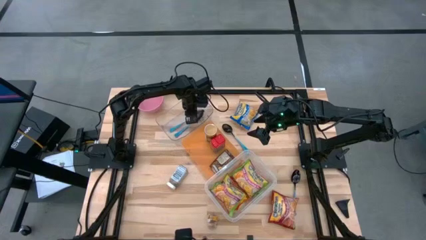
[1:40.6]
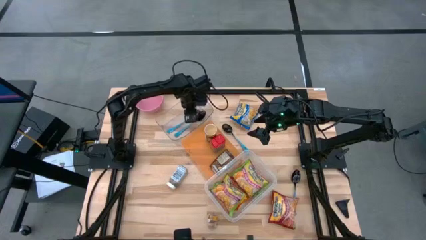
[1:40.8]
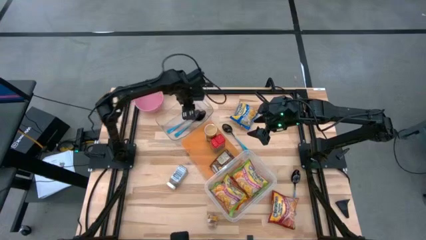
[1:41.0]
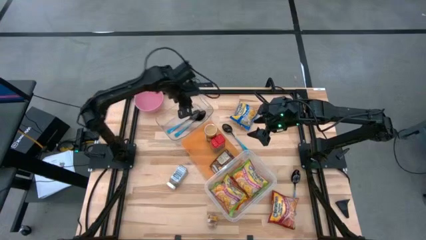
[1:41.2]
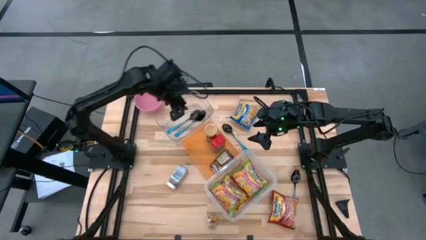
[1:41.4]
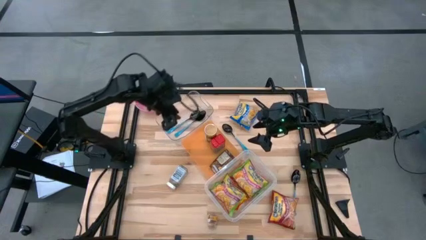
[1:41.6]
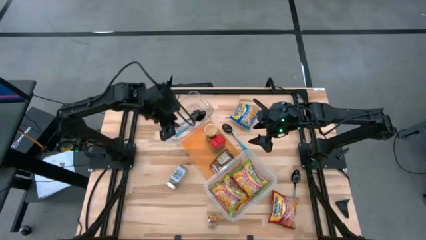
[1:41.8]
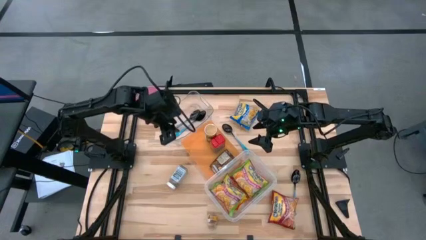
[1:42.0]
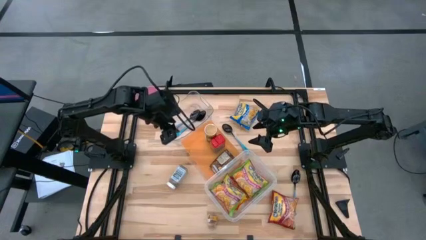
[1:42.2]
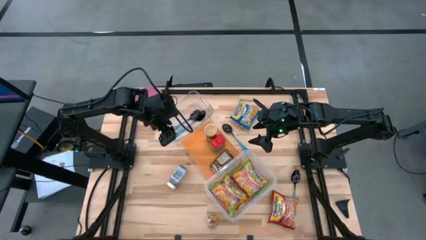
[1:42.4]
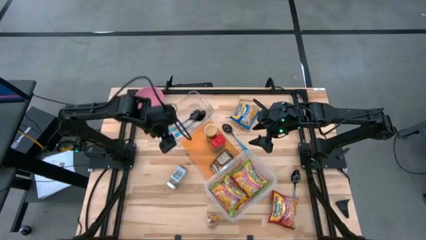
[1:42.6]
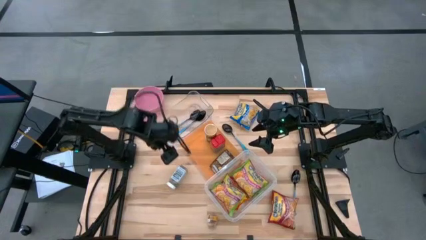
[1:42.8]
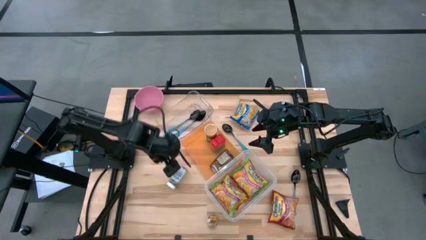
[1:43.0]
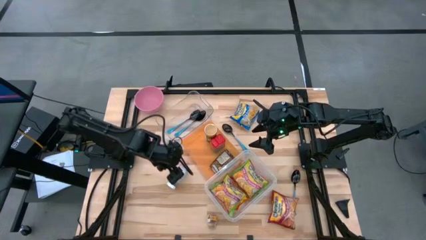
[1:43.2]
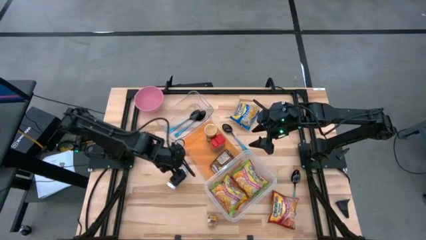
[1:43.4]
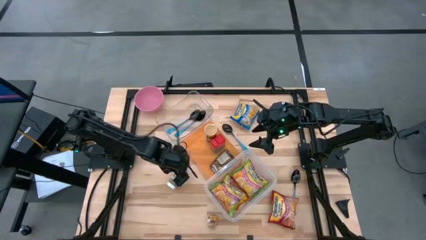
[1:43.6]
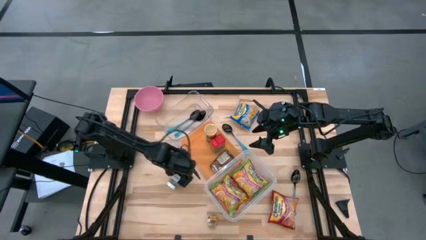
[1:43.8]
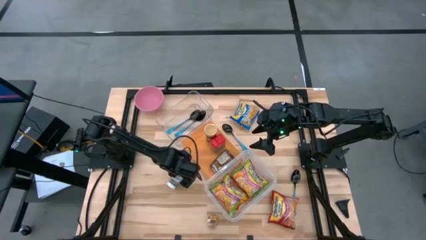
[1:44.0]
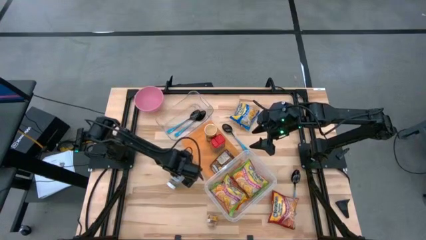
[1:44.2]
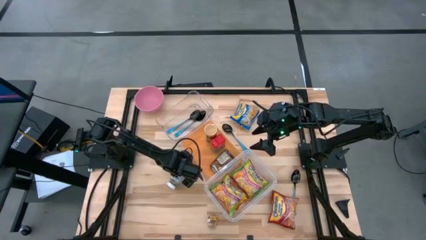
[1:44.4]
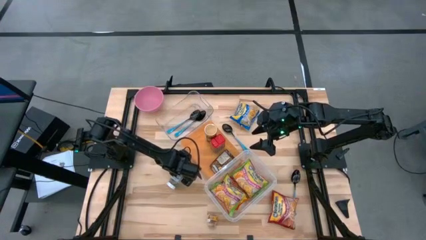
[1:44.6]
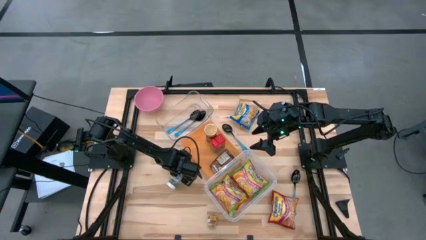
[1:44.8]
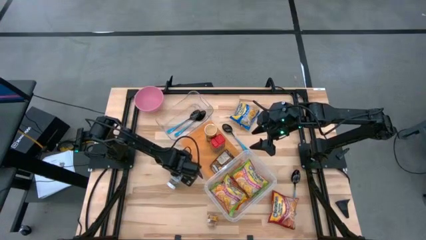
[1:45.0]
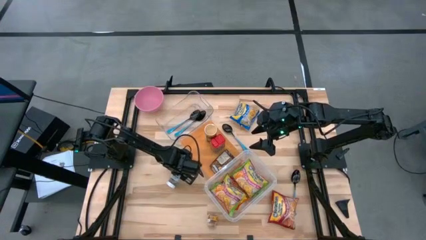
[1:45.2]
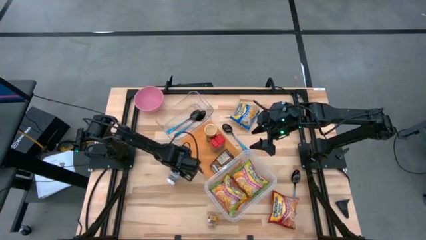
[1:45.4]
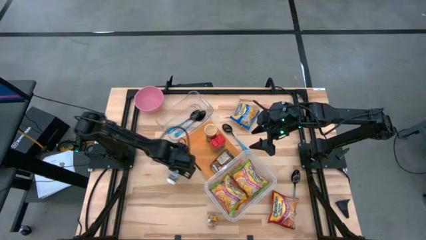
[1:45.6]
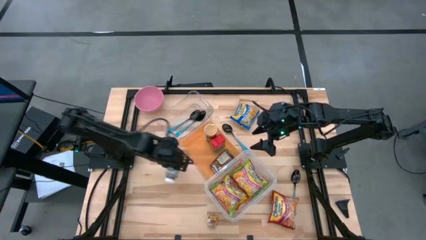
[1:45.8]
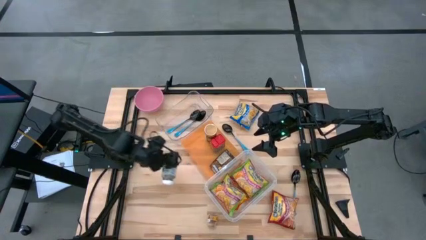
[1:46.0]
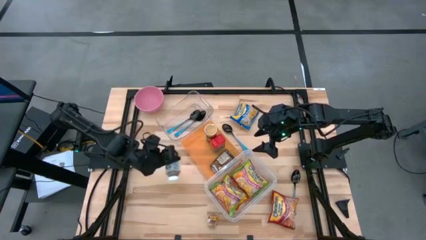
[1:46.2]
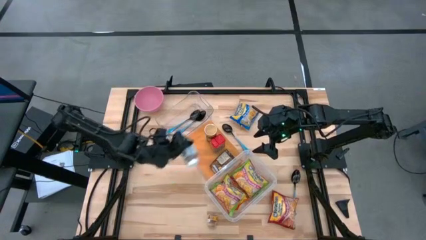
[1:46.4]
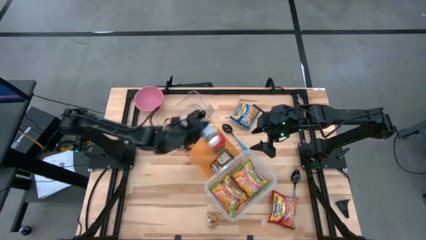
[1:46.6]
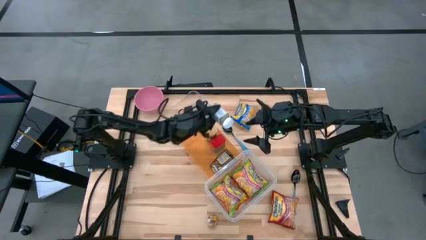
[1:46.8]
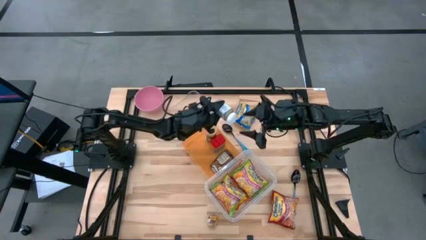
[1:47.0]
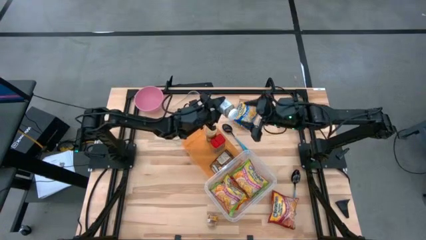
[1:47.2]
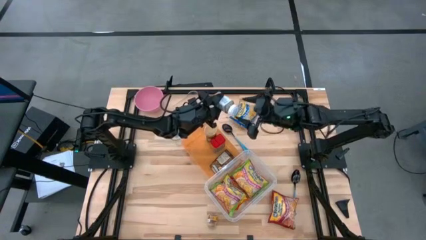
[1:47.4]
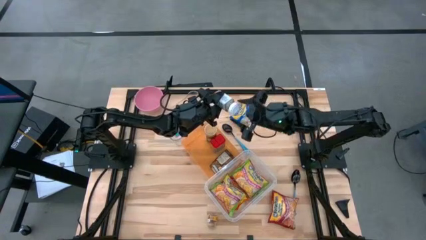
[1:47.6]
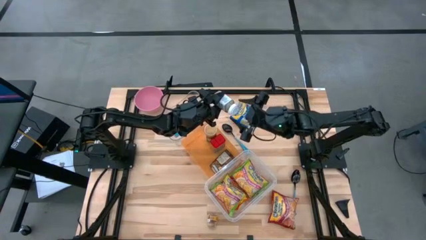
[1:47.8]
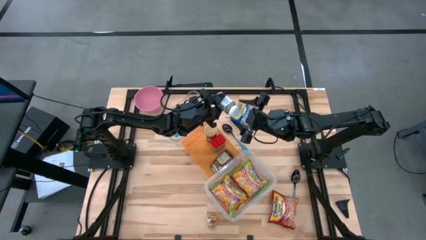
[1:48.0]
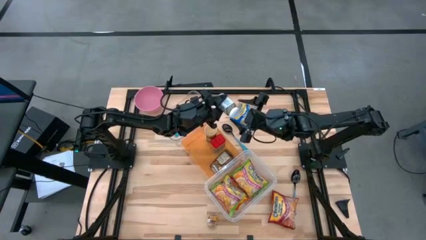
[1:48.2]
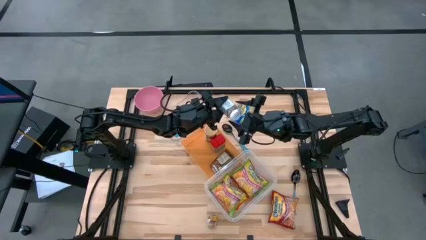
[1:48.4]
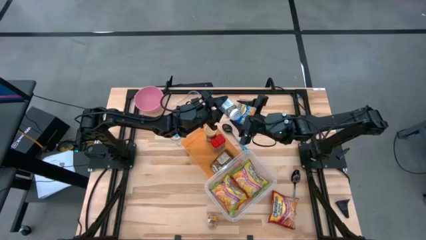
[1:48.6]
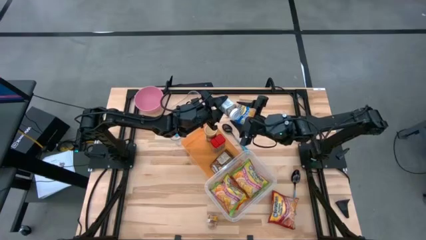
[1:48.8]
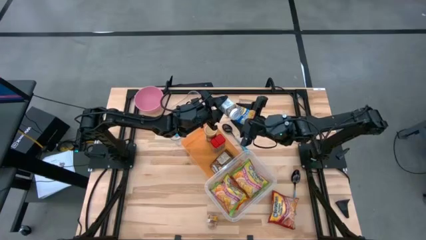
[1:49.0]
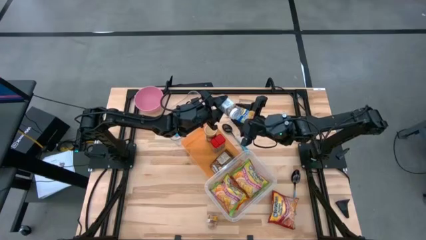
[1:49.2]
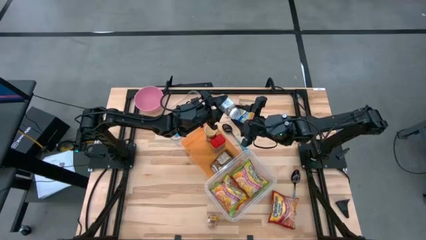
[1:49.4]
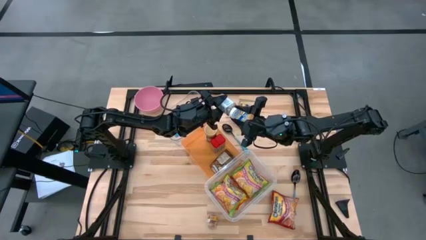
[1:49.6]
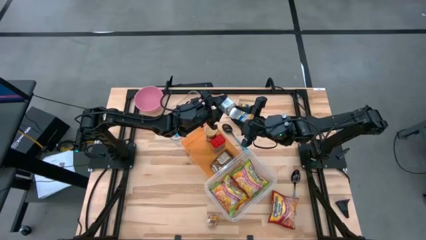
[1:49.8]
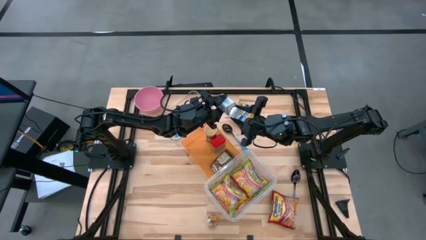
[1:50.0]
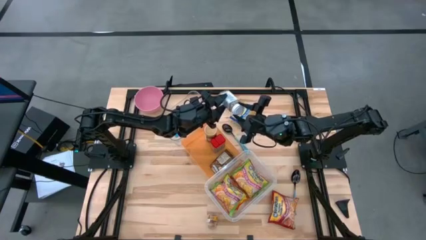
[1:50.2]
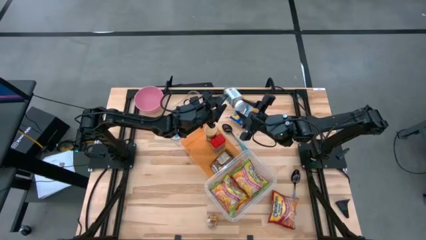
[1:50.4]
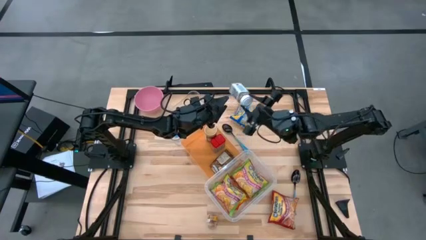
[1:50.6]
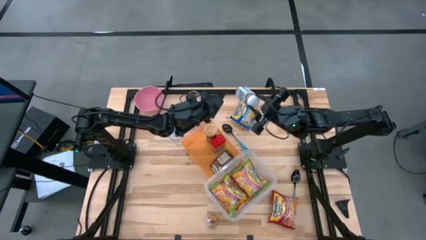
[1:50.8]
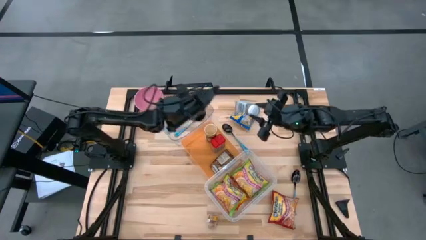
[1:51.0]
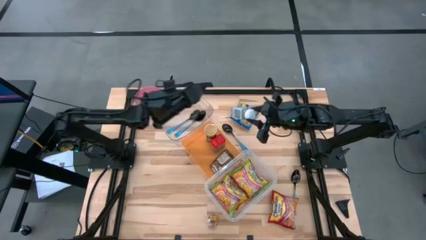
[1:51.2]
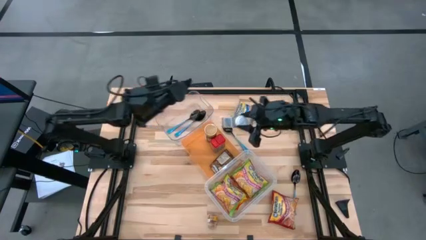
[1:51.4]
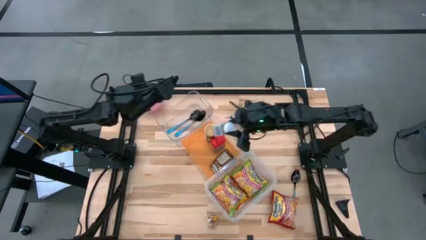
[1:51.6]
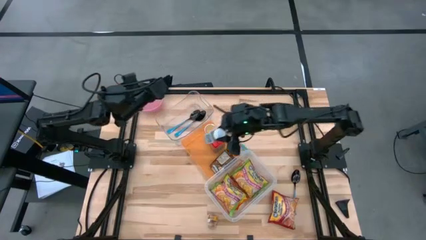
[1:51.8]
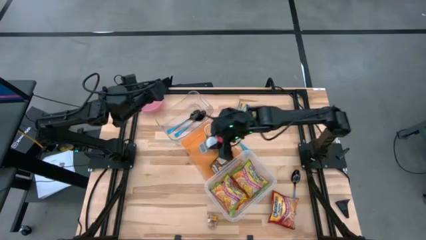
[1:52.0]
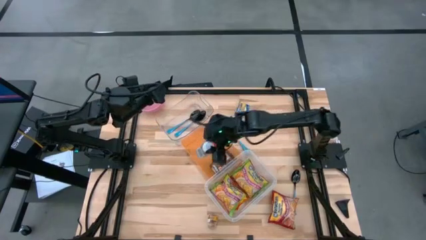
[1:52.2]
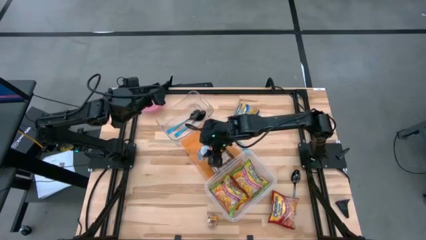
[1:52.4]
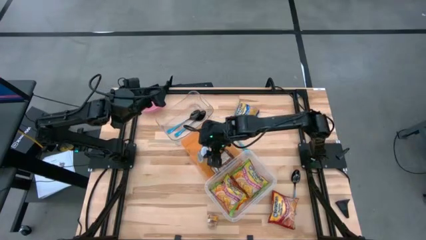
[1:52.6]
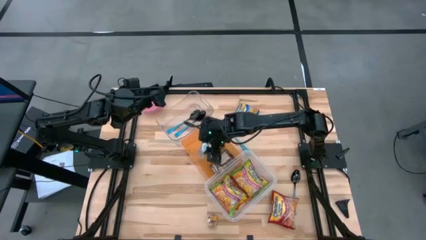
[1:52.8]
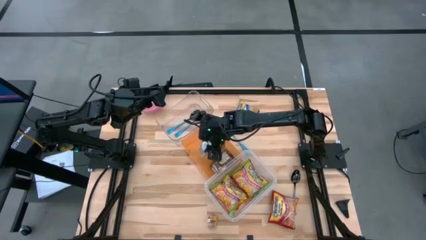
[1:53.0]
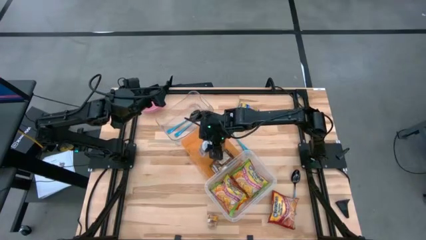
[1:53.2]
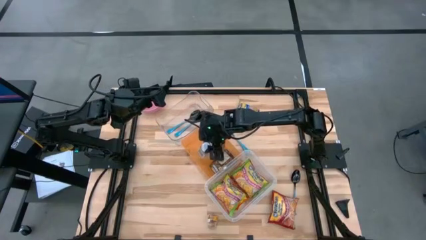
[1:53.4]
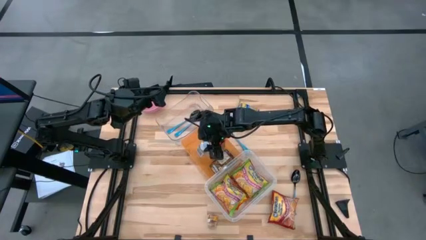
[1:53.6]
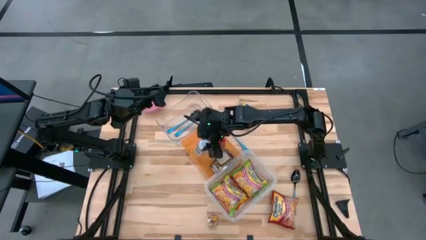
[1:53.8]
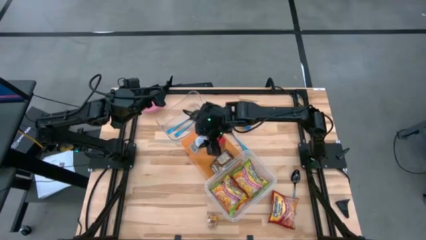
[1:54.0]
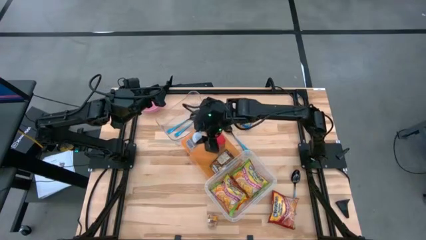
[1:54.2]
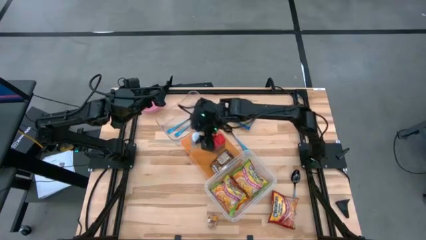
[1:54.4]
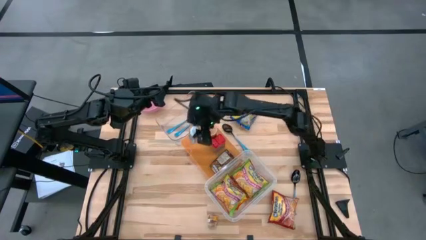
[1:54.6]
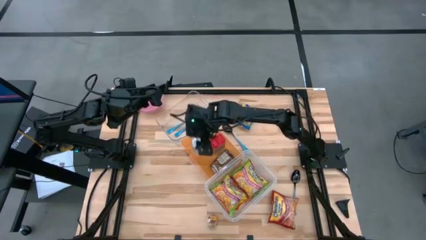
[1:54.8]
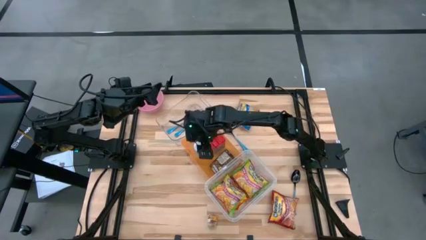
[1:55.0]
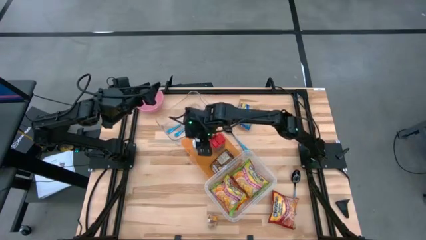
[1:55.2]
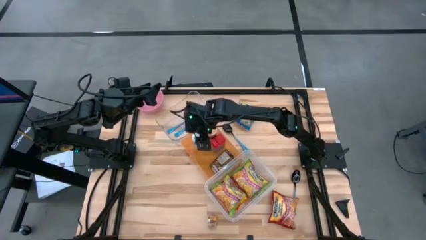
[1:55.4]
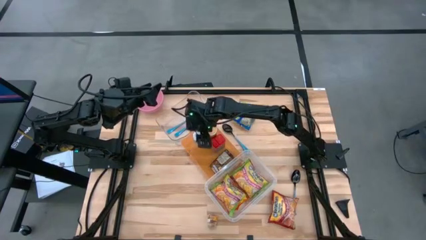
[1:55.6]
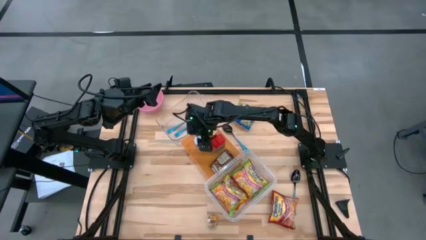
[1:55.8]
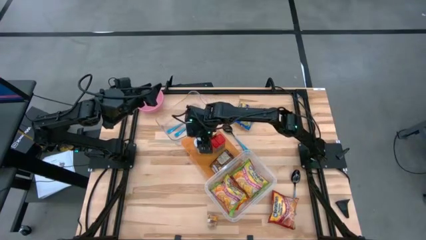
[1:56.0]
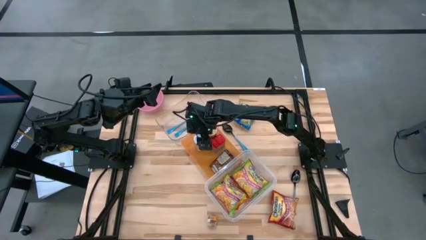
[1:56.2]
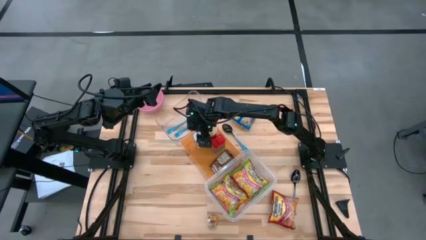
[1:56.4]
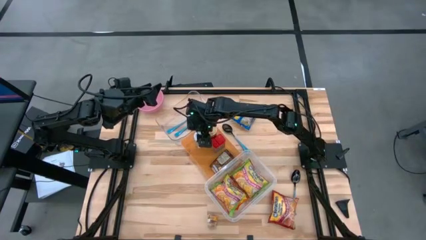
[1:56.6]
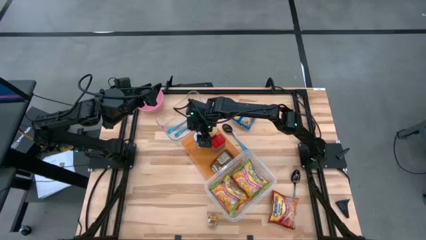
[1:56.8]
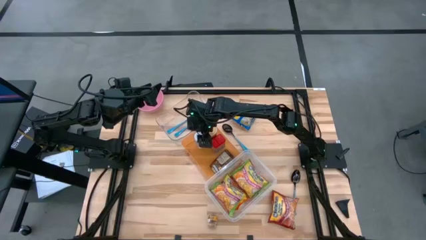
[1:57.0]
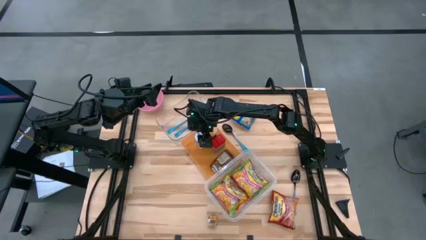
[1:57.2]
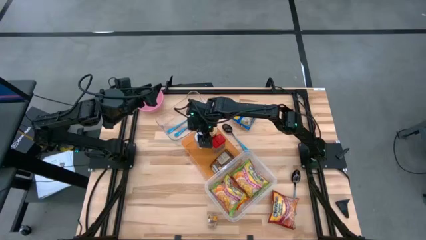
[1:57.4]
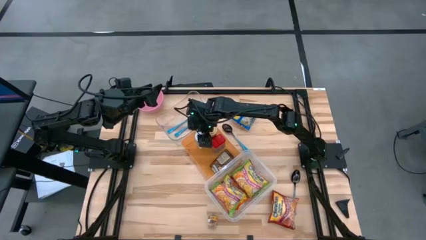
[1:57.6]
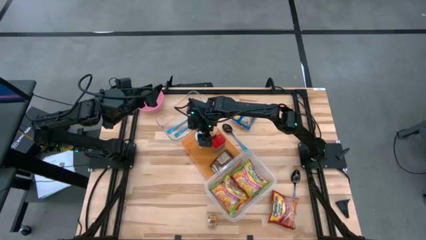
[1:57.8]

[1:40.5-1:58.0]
Task: Pick & Place Food Item
Put the white seasoning bottle into the orange bin
